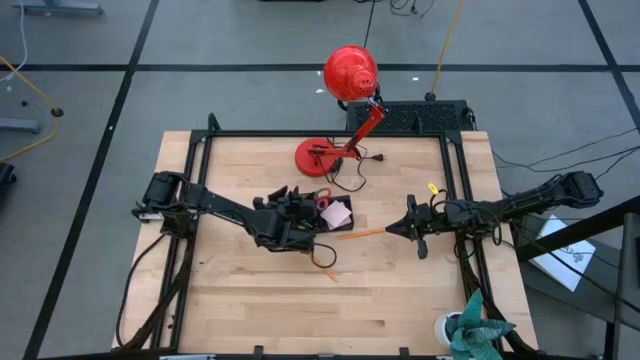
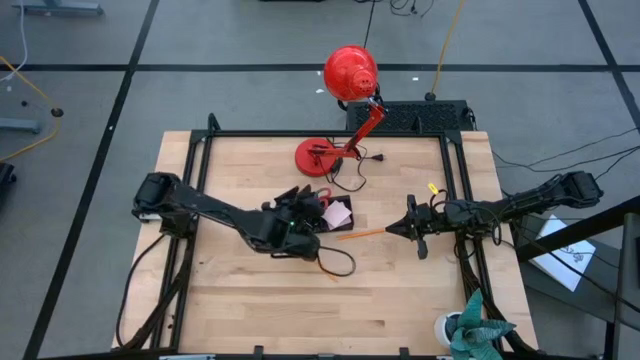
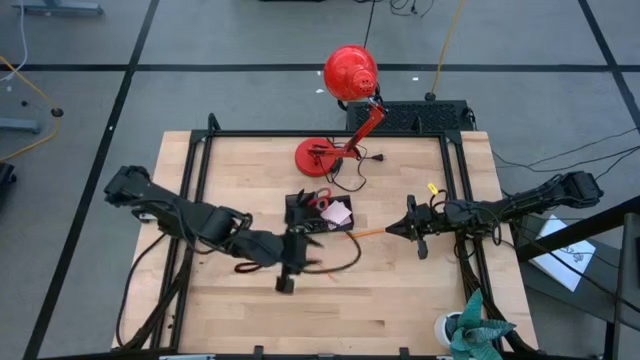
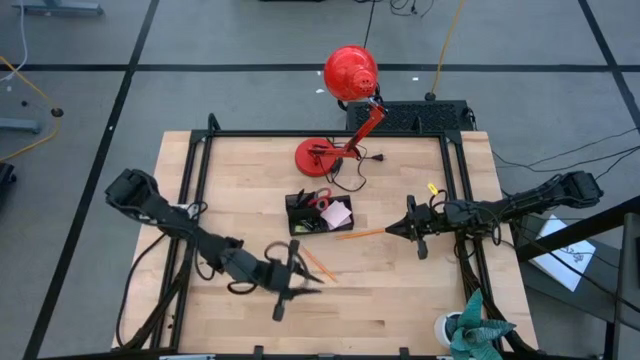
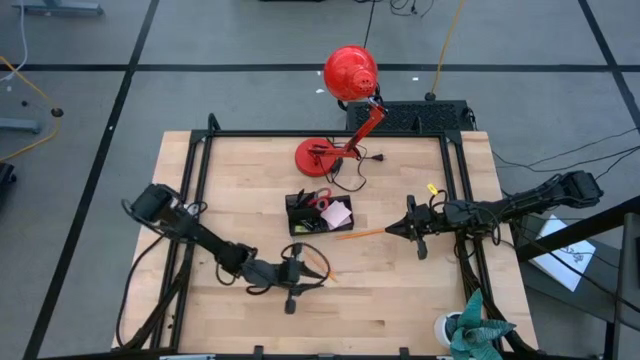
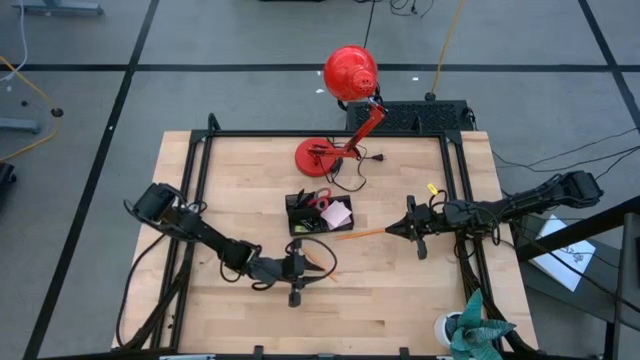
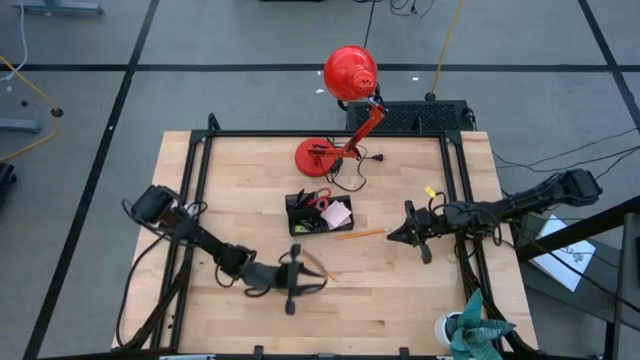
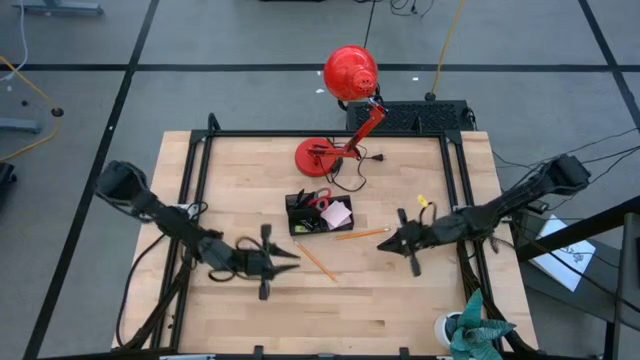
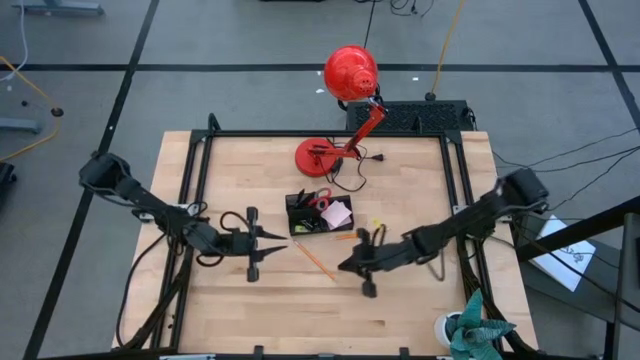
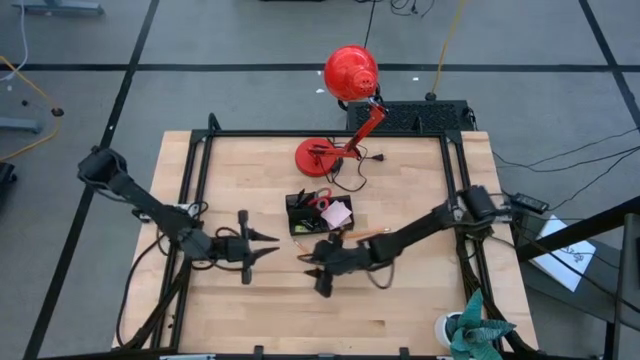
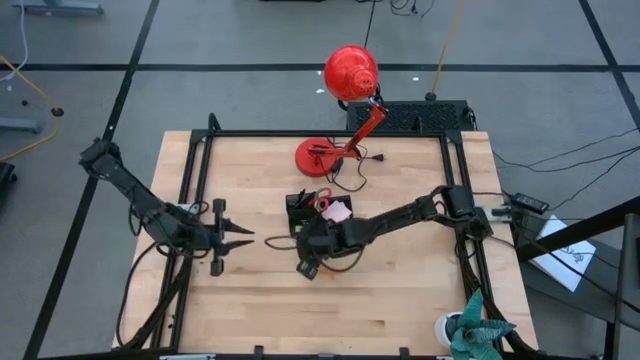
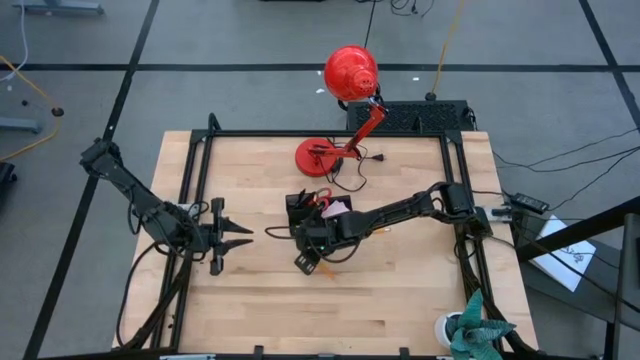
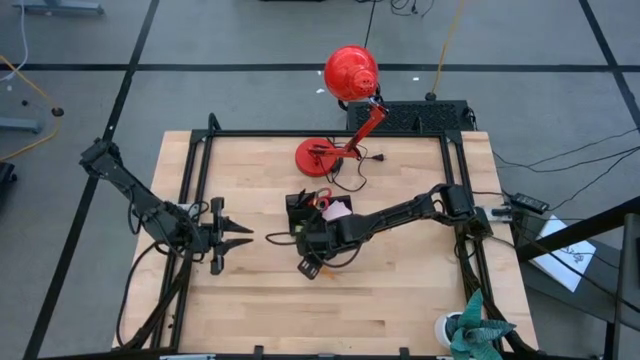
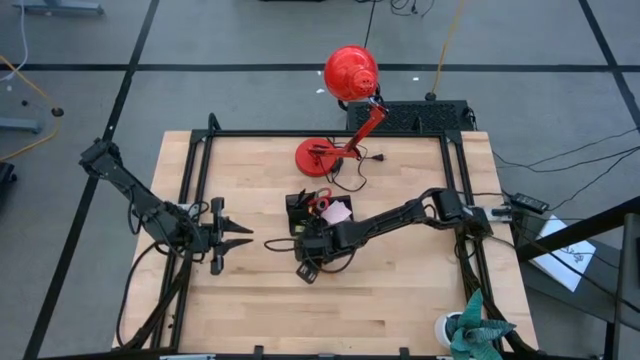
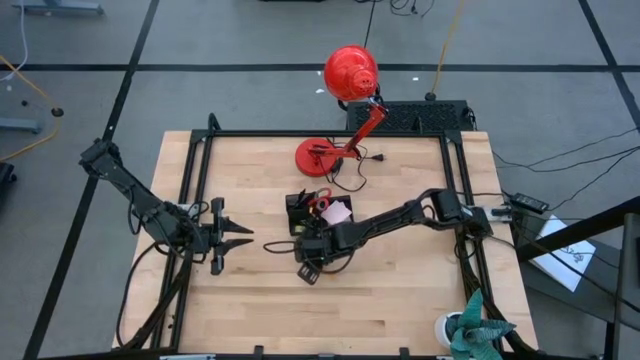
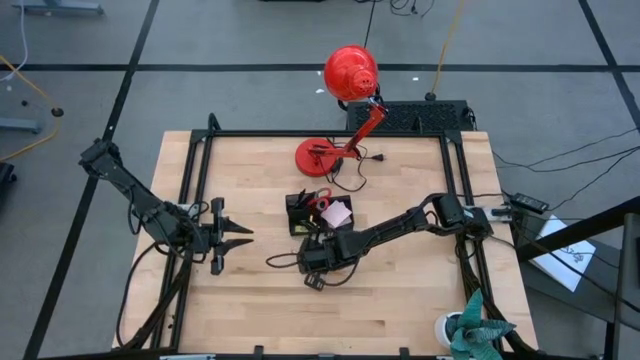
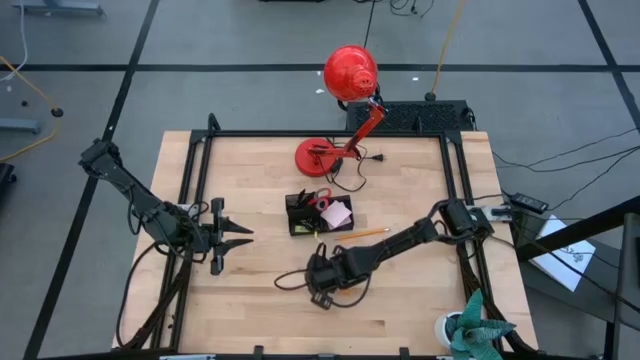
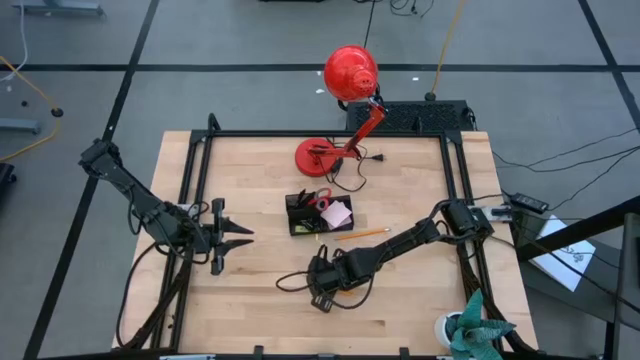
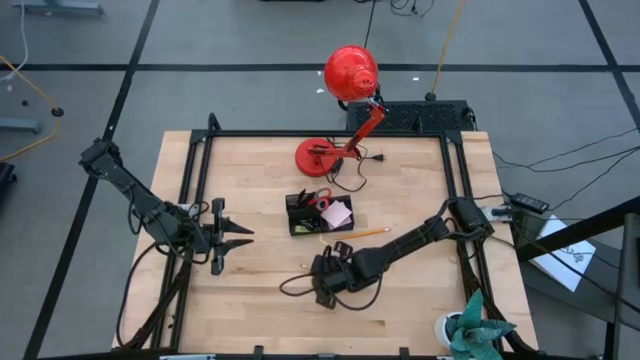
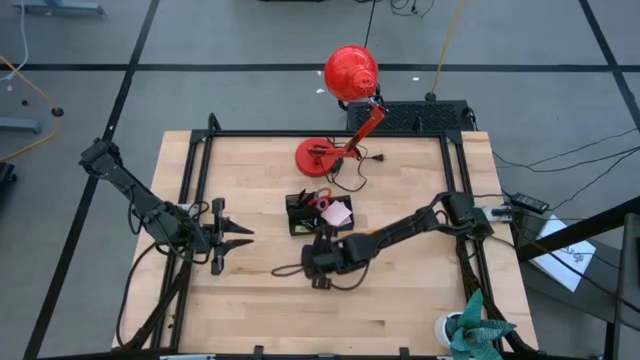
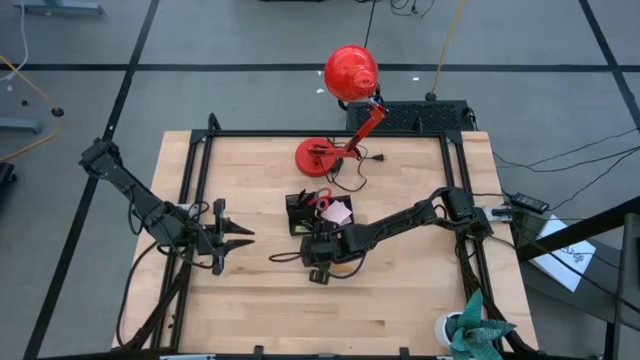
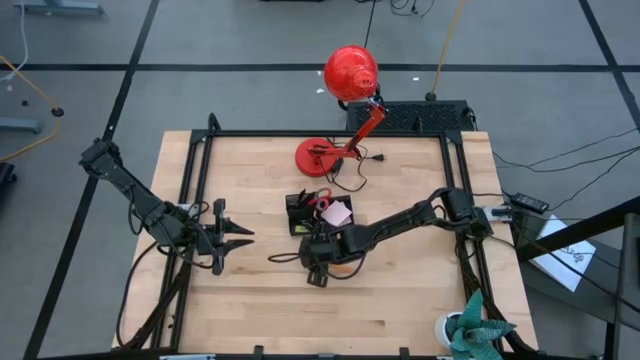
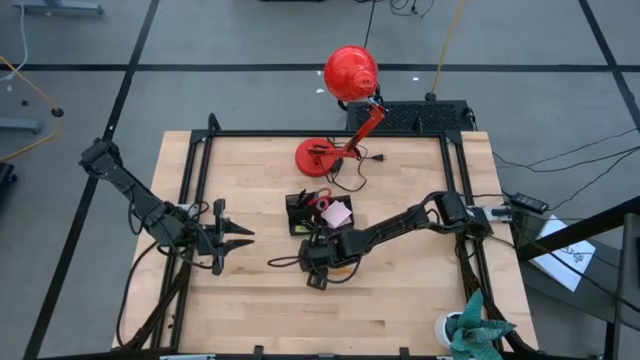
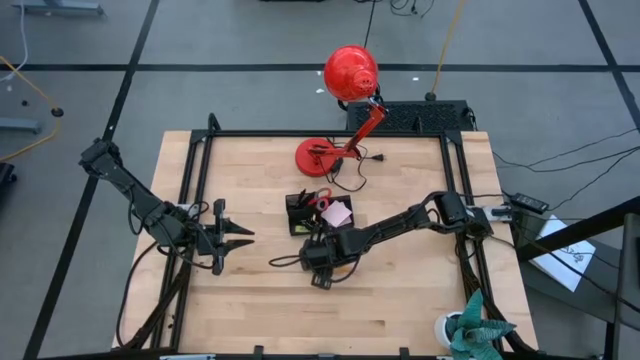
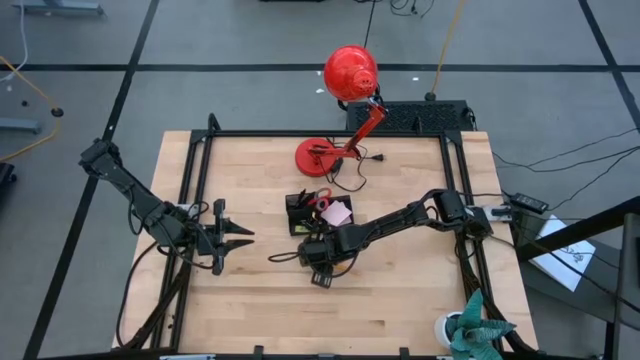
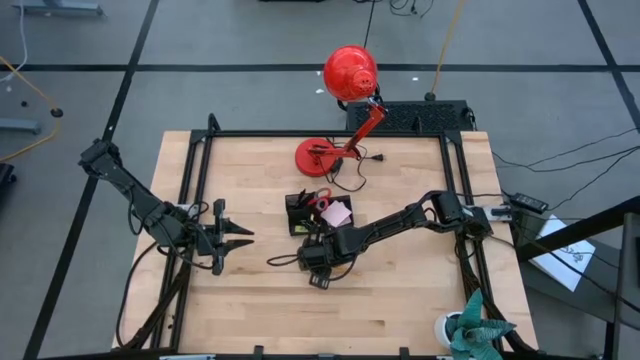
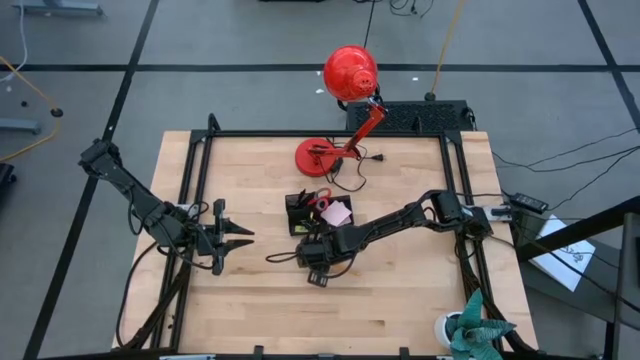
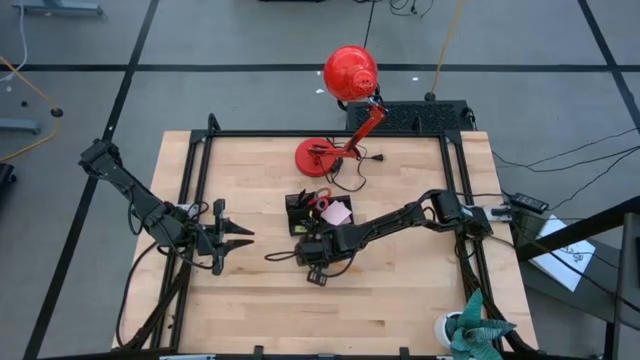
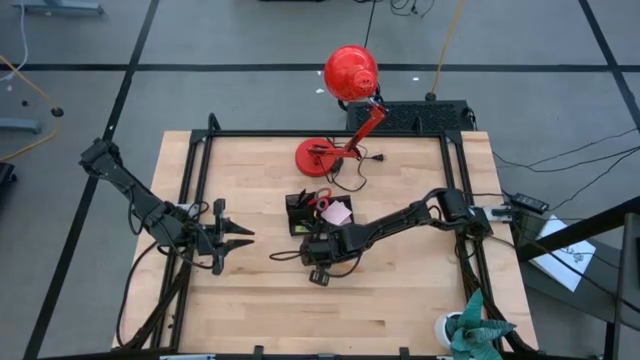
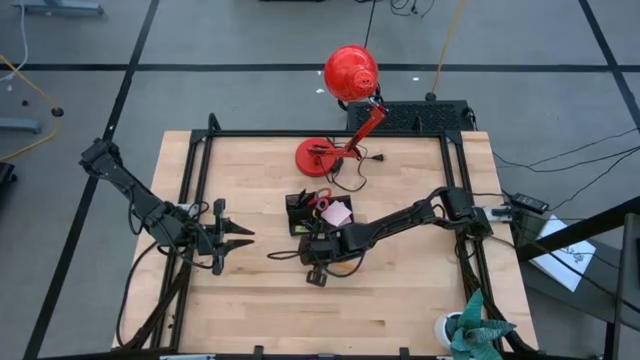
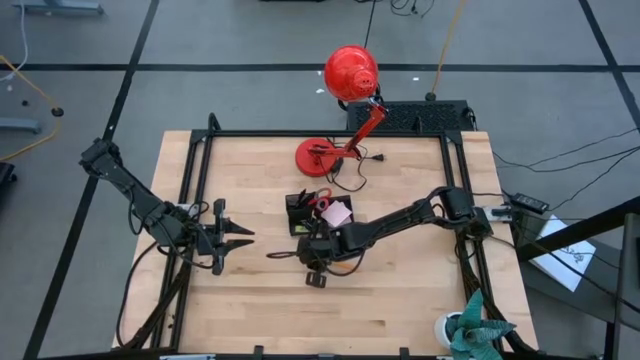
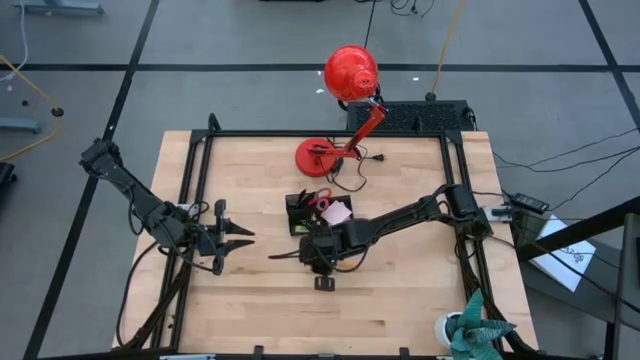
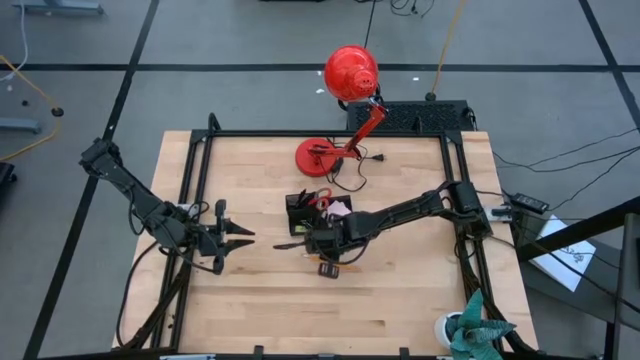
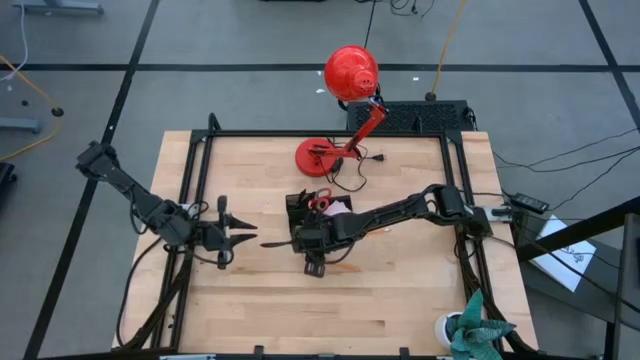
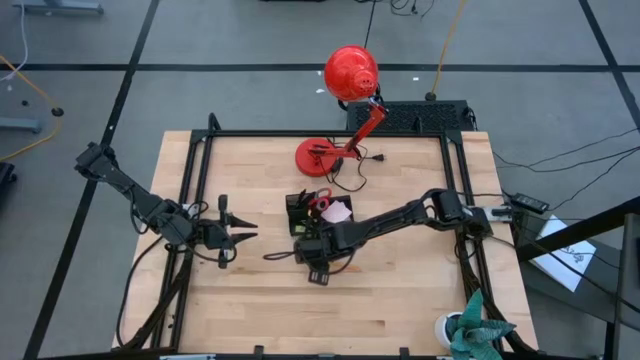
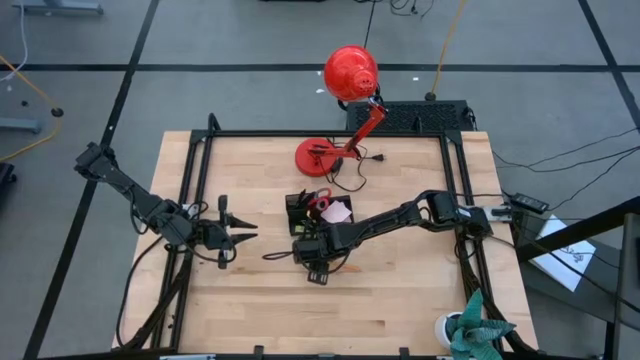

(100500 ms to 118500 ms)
Task: Pick and place office supplies into organizer
Put the bottom yellow pencil into the desk organizer

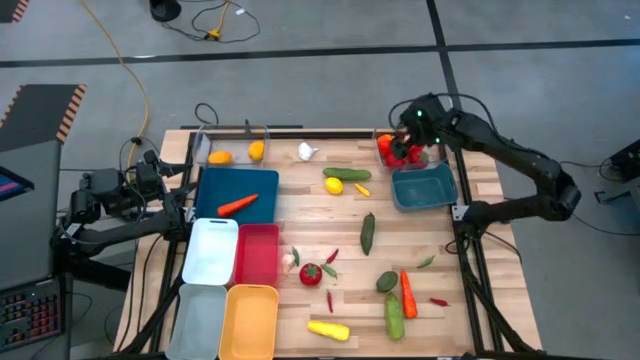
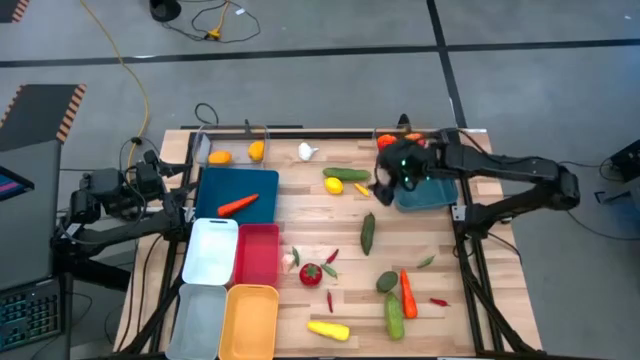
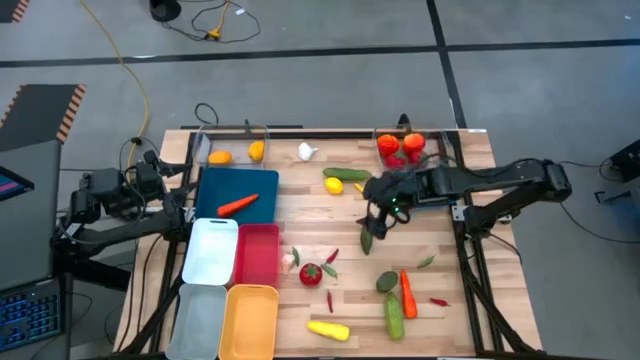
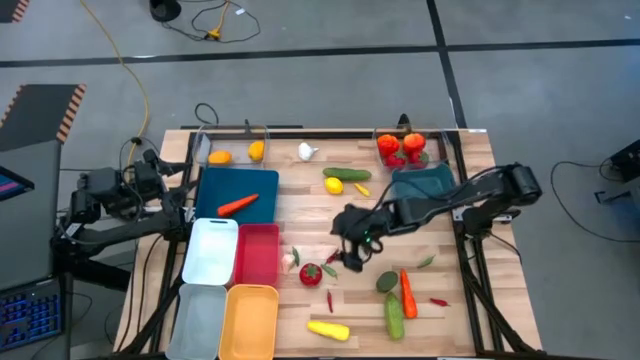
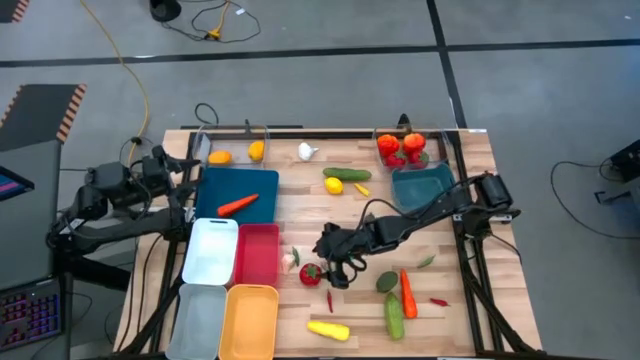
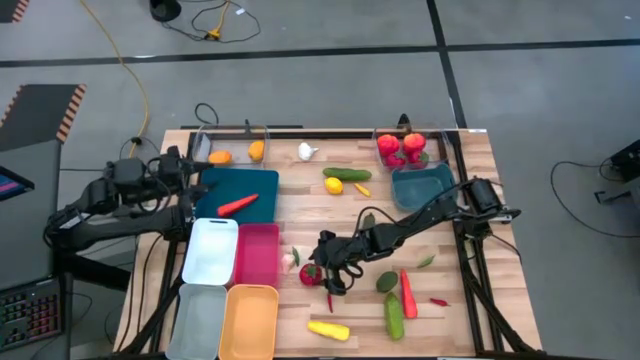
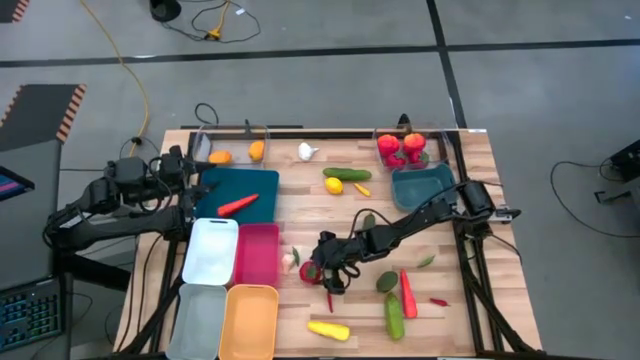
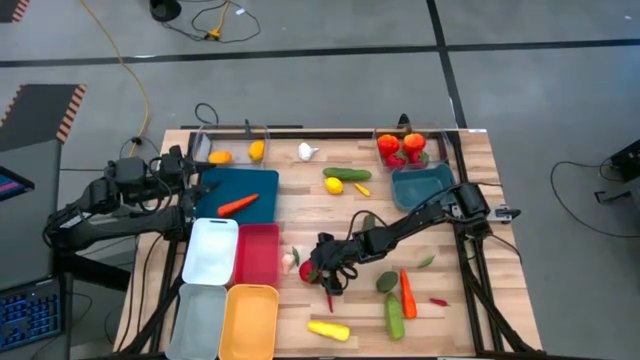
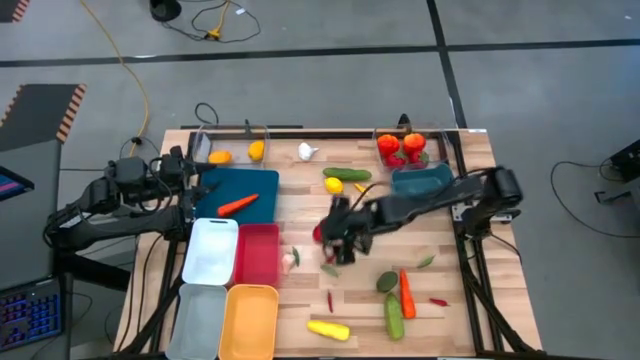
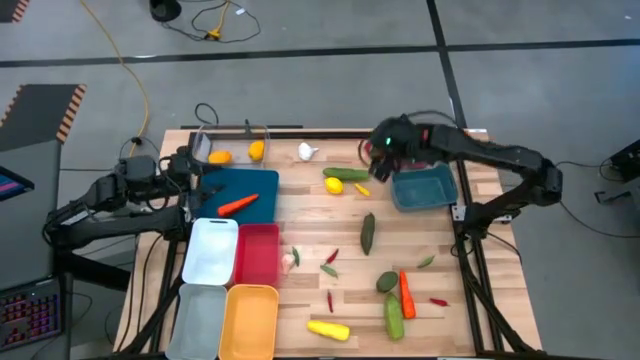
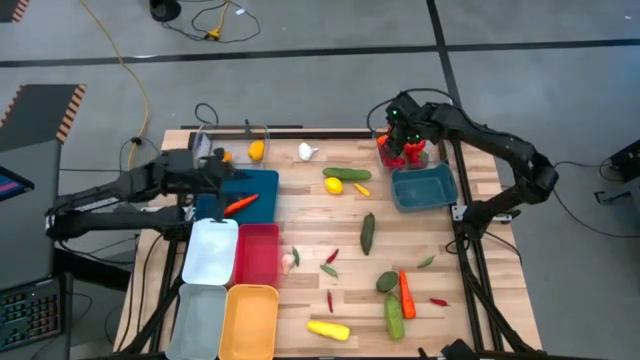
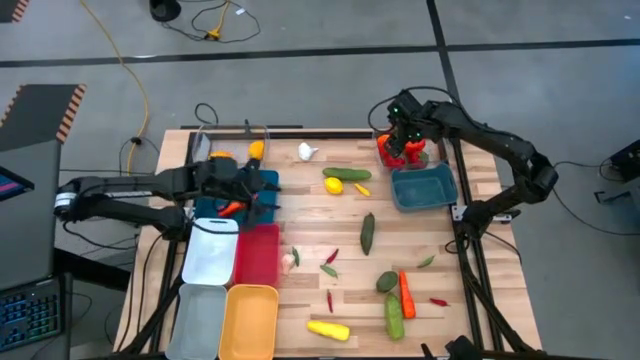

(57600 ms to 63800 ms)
Task: Sort produce into baskets
Put the red tomato into the right transparent bin
